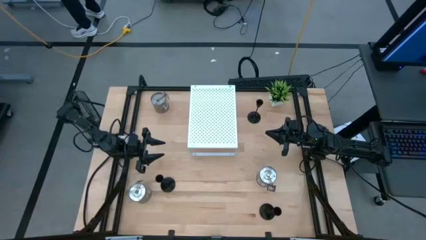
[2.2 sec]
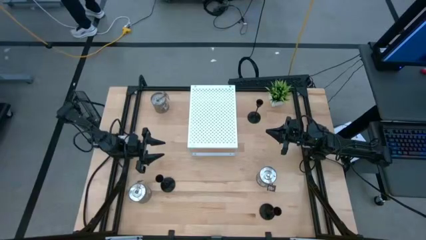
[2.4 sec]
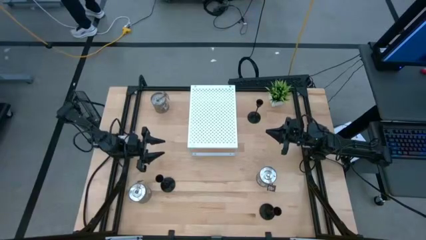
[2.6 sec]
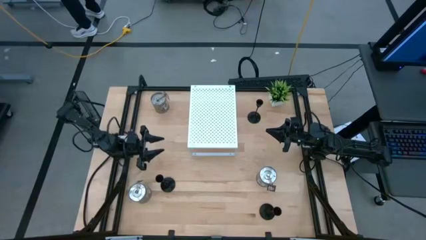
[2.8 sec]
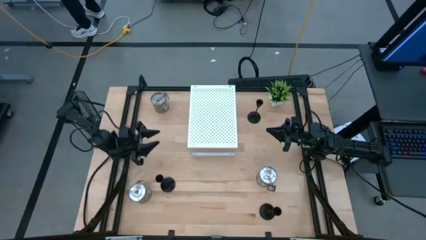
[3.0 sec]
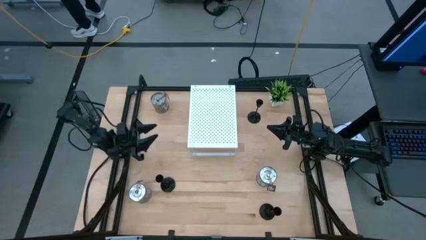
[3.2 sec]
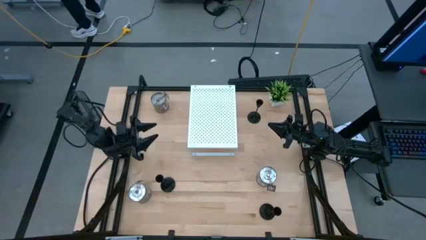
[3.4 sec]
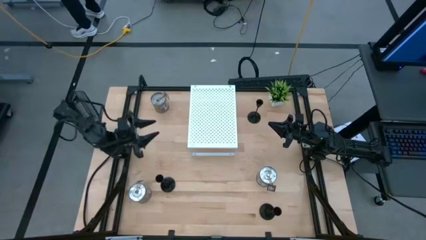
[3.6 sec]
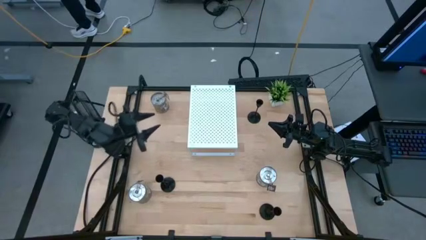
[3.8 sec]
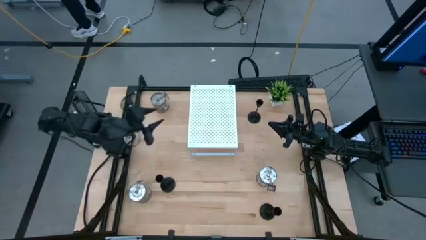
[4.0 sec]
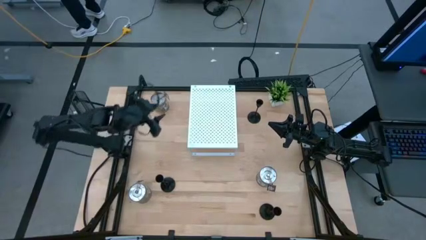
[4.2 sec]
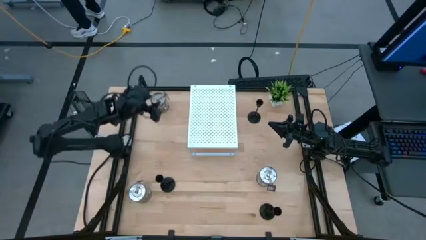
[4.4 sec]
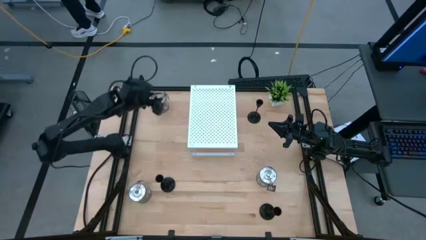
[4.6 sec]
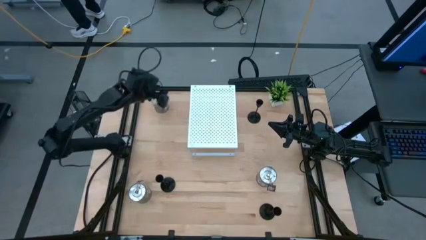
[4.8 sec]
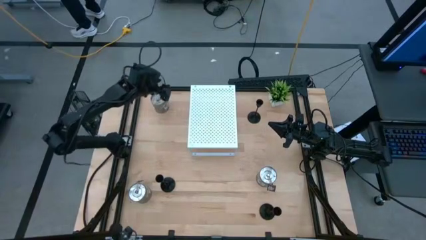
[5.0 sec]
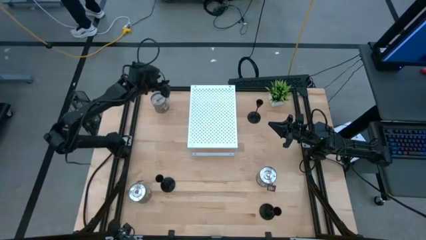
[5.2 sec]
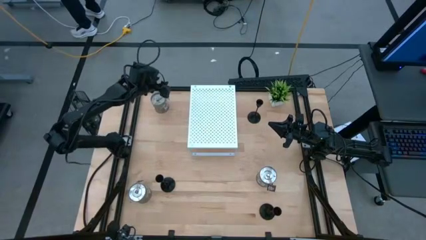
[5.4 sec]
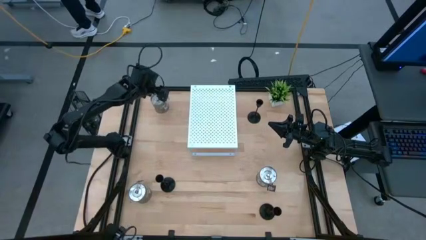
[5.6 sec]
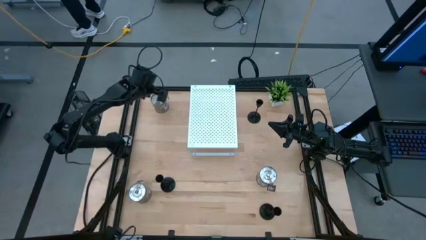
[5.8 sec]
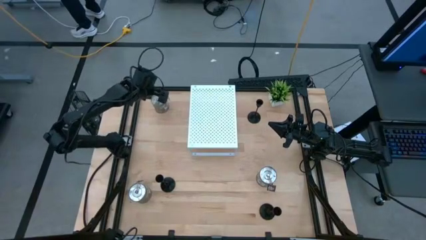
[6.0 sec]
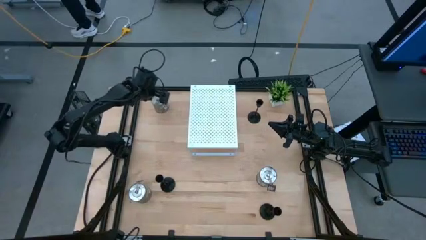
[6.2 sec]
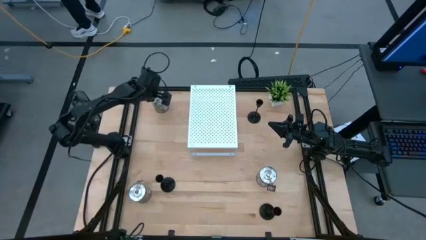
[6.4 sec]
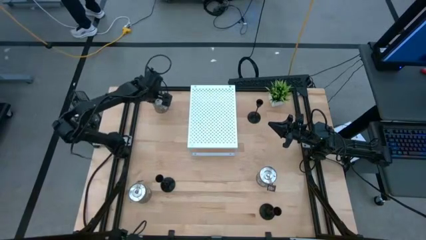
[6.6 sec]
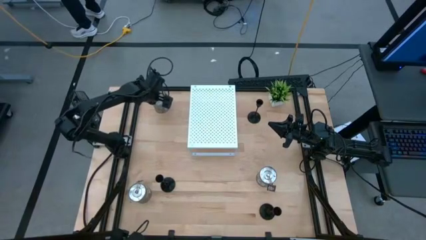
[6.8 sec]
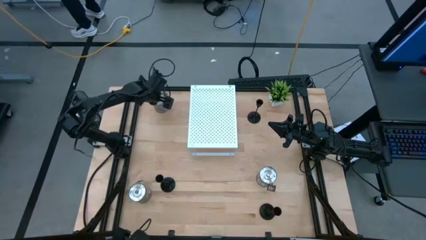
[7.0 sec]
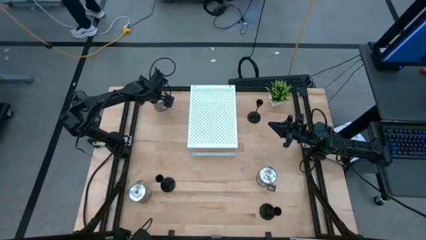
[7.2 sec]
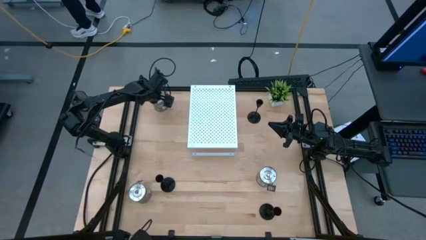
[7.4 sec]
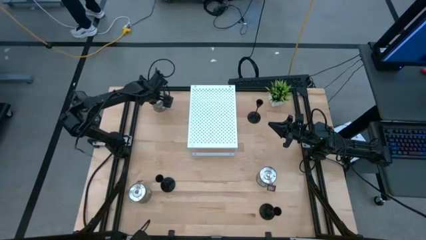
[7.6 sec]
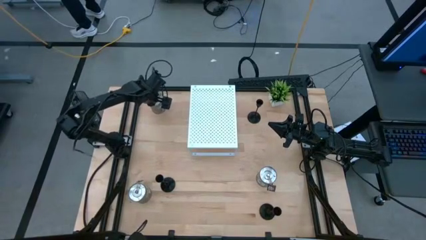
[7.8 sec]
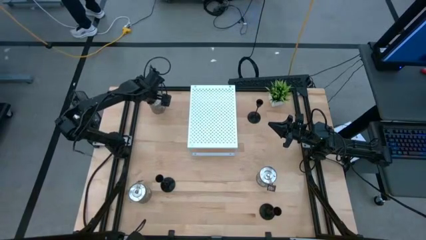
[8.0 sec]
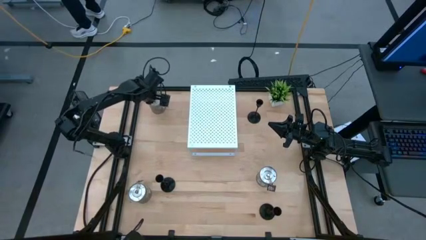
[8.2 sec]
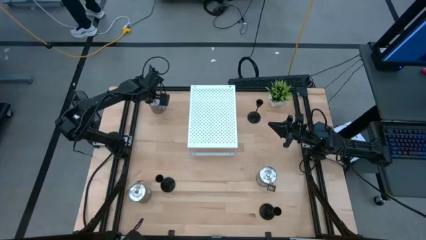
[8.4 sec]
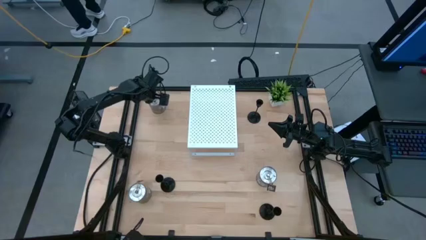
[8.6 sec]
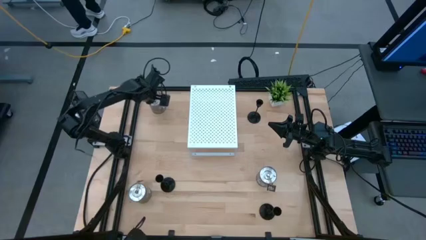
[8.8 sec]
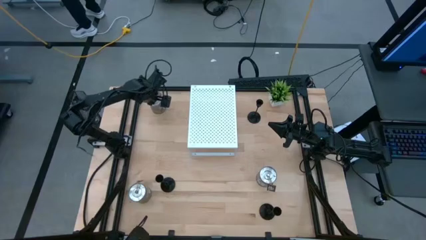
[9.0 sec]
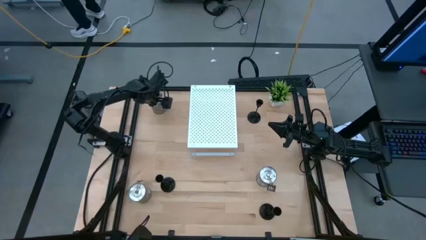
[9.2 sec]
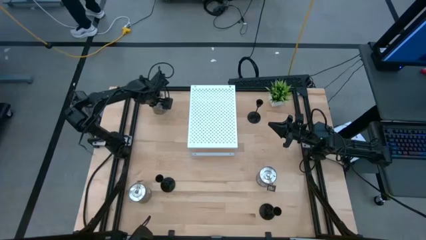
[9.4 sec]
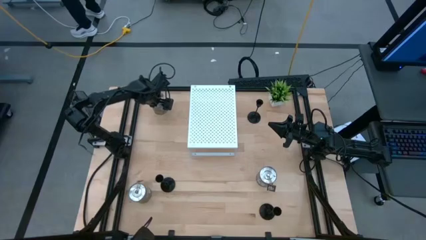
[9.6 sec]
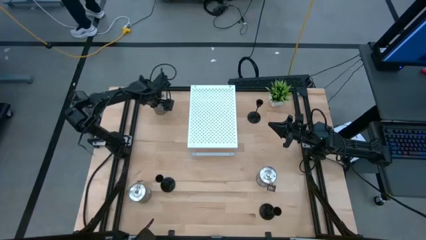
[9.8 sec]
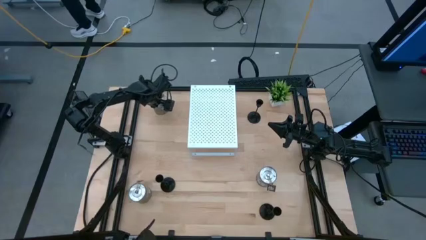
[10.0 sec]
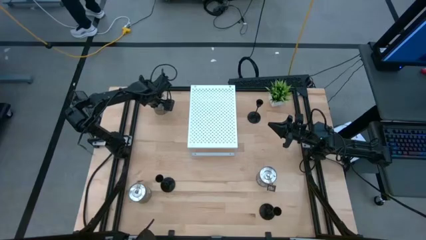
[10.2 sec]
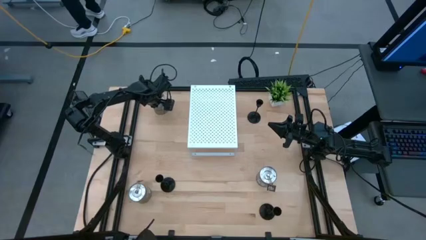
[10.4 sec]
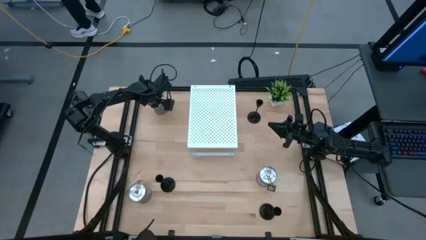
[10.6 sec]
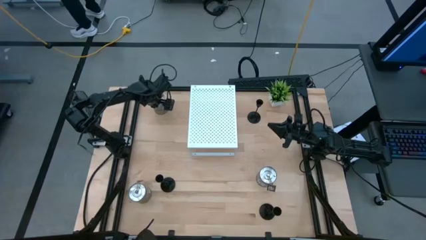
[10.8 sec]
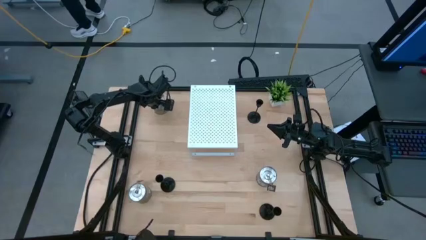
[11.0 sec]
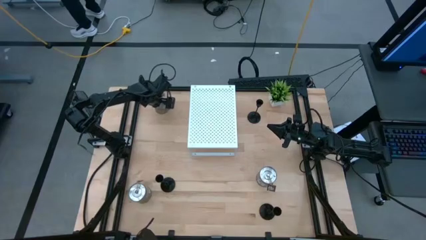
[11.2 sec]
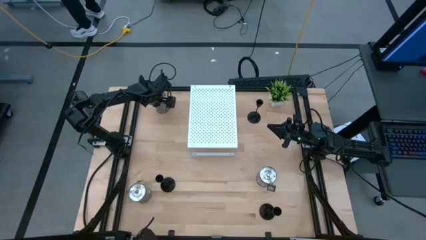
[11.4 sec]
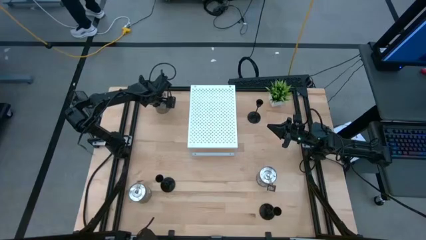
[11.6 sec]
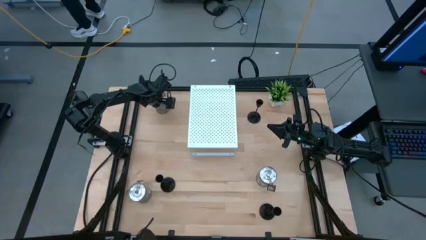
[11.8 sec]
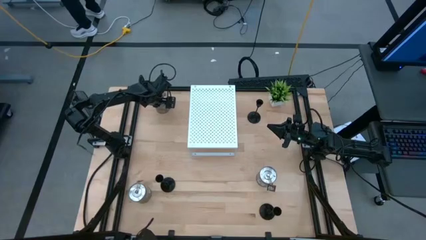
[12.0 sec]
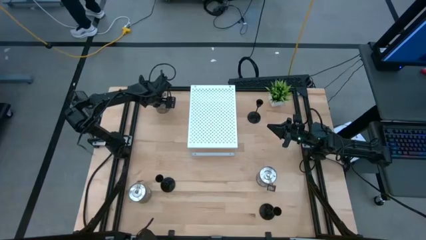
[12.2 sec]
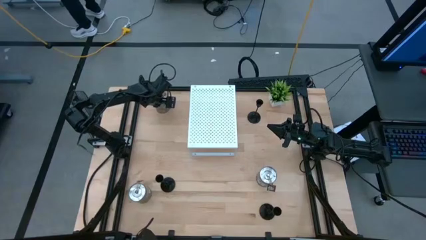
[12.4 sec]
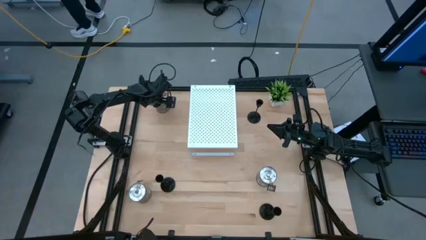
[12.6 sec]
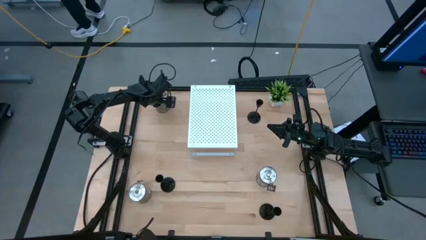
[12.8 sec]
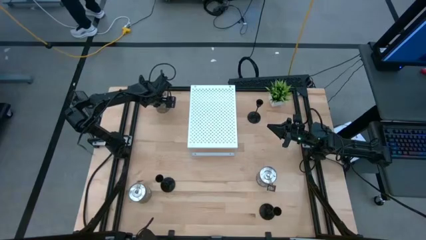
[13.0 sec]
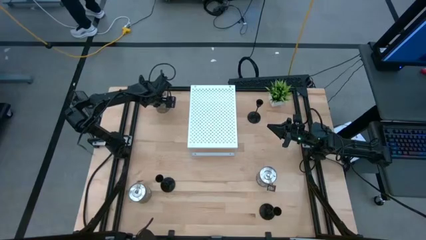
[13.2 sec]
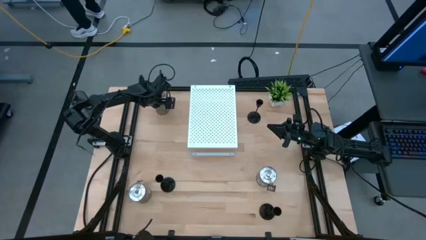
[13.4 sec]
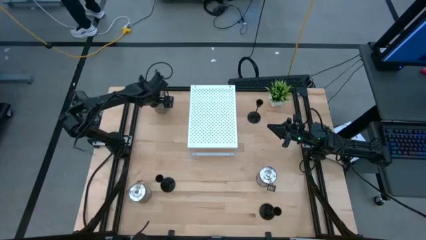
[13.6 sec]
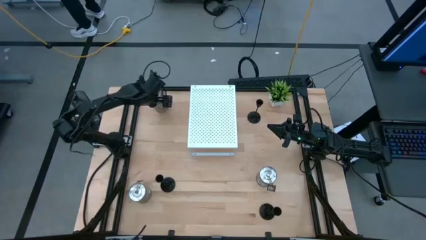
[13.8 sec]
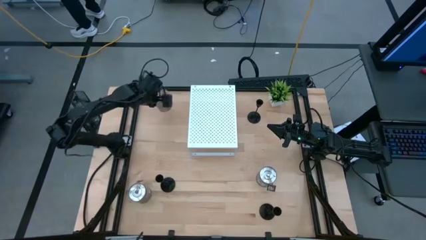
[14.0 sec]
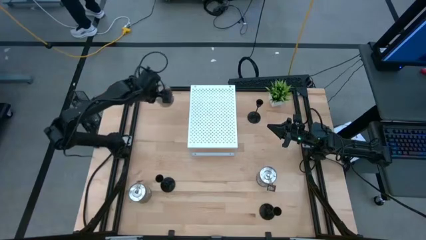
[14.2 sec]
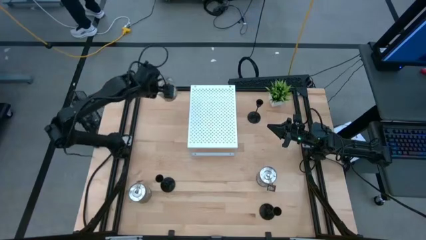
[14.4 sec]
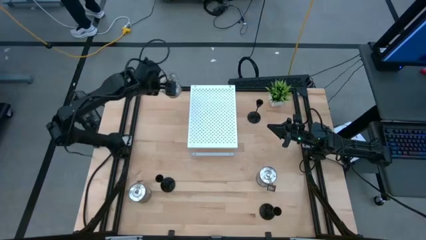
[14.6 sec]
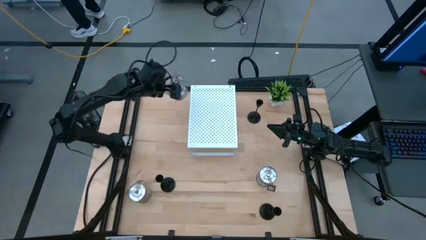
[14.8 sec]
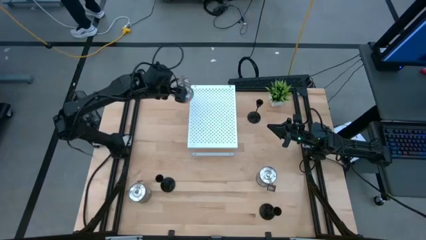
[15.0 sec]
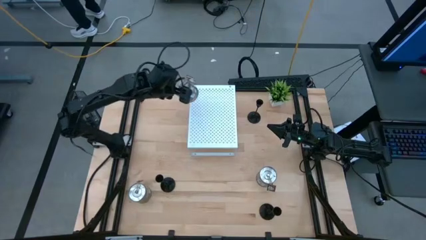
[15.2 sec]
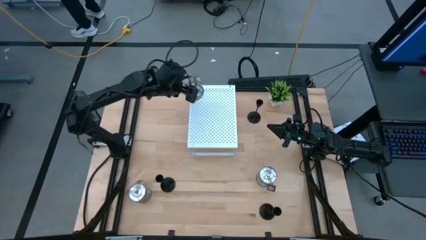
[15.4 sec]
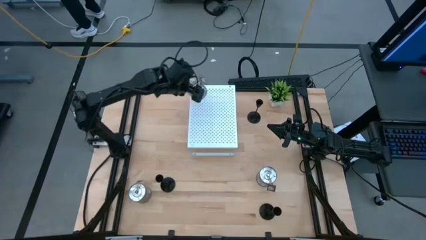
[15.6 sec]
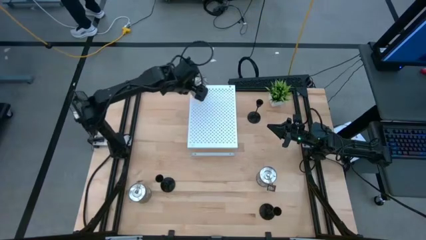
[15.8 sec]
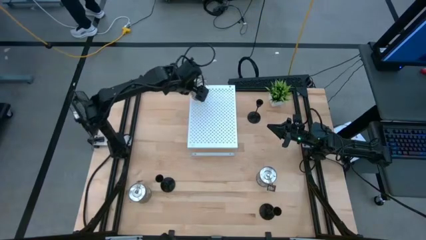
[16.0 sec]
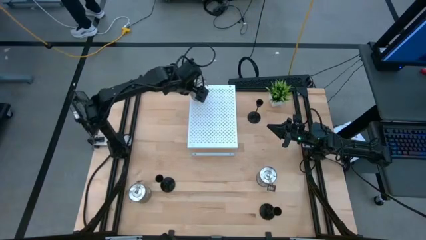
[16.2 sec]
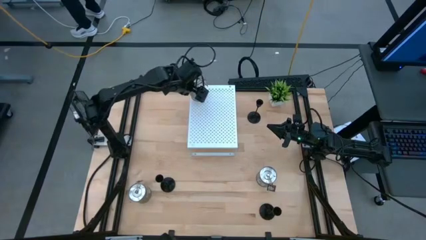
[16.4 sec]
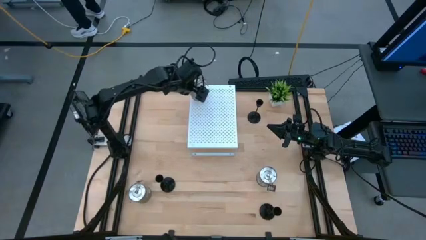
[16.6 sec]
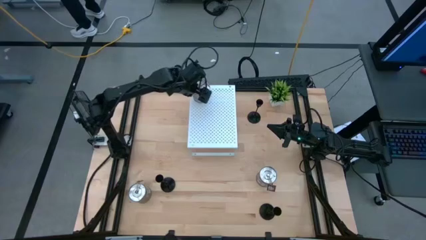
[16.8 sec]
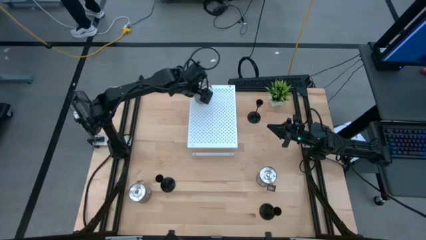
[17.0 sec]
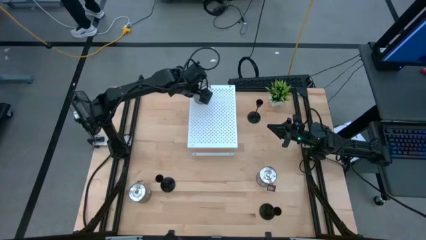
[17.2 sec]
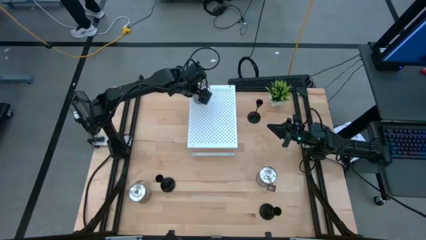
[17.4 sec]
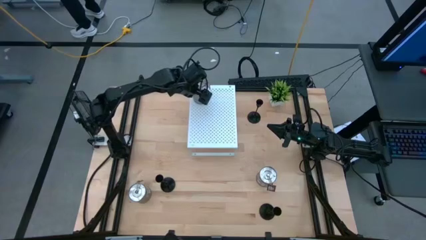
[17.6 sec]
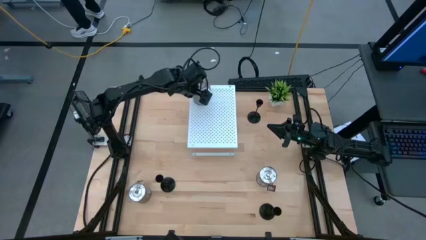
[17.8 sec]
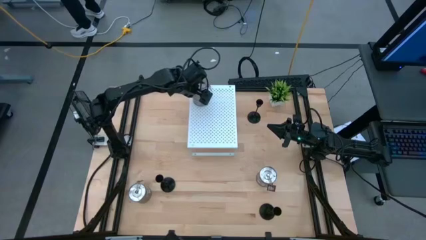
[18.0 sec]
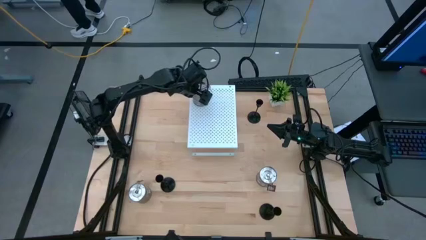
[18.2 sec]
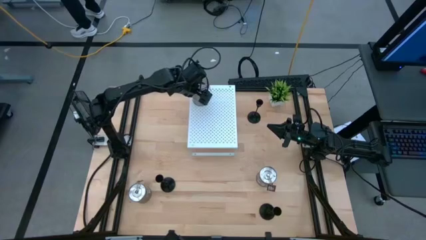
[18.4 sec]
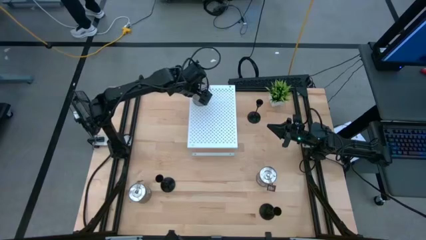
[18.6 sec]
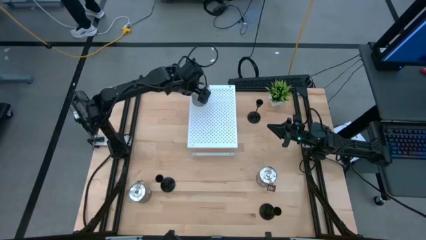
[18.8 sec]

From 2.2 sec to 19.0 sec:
Task: Pick & Place candle stick holders
Put the top silver scented candle on the shelf
